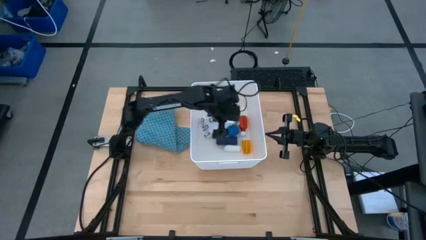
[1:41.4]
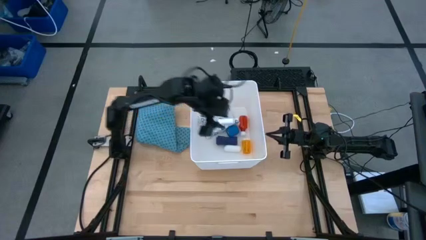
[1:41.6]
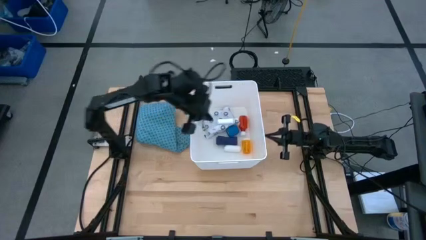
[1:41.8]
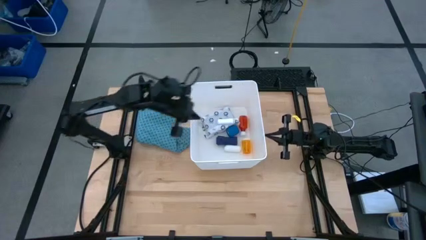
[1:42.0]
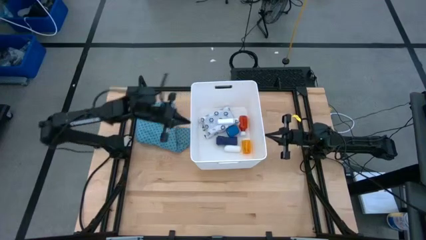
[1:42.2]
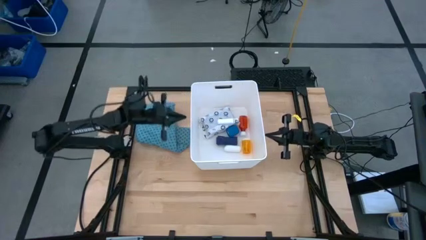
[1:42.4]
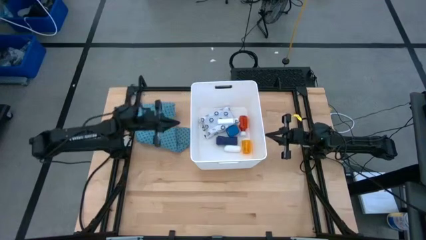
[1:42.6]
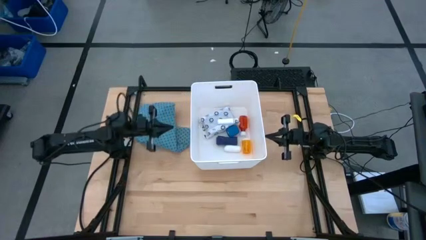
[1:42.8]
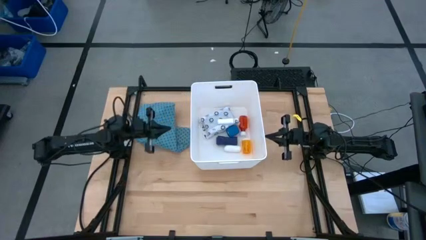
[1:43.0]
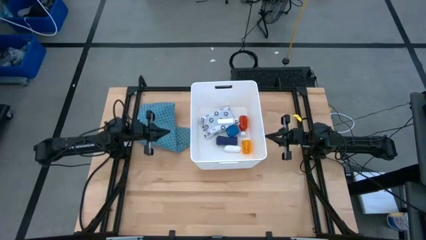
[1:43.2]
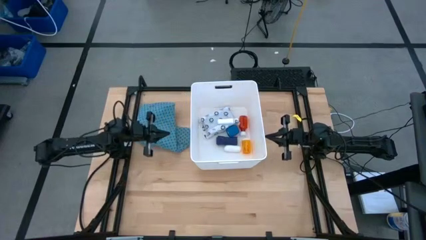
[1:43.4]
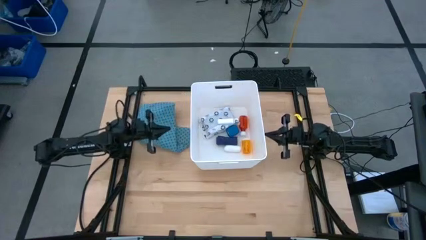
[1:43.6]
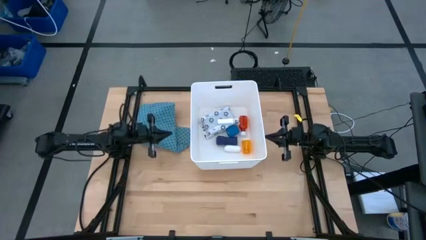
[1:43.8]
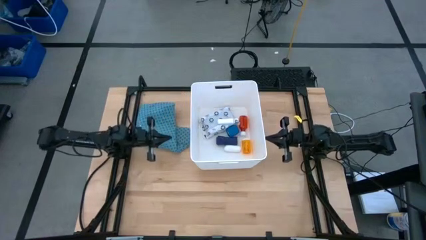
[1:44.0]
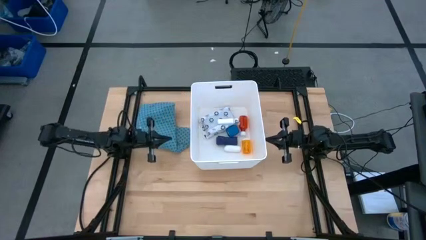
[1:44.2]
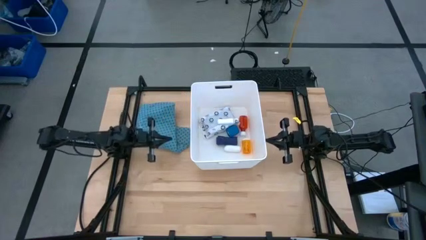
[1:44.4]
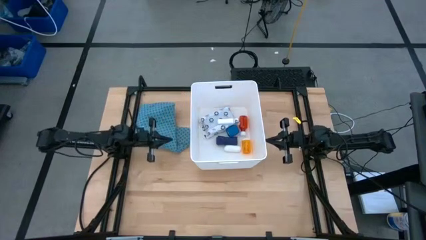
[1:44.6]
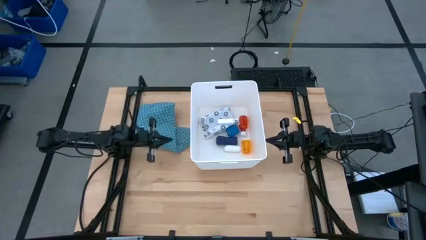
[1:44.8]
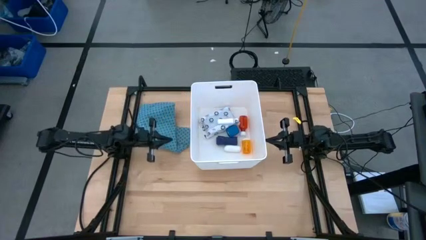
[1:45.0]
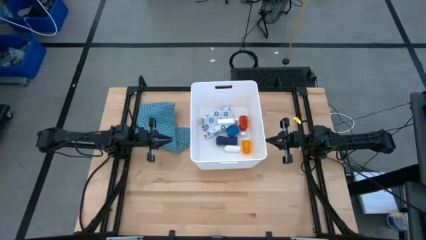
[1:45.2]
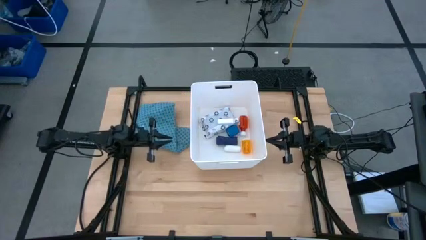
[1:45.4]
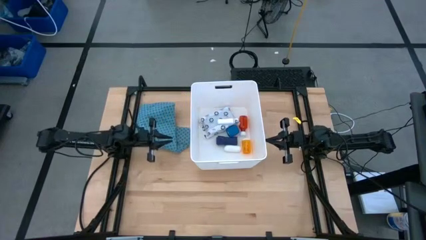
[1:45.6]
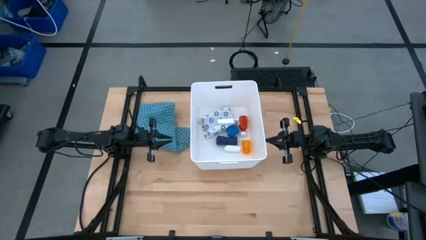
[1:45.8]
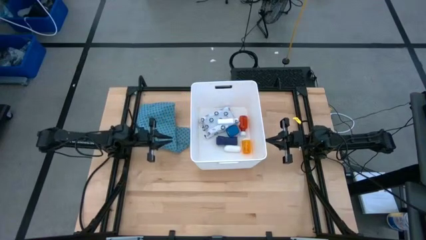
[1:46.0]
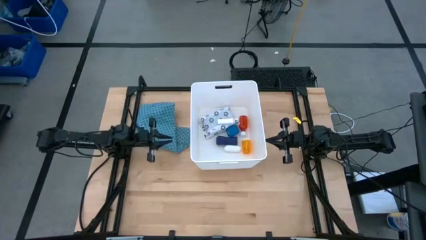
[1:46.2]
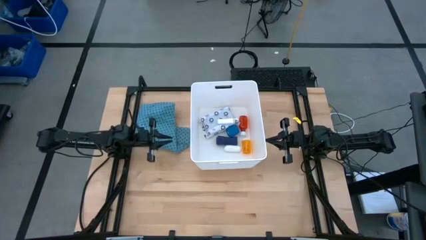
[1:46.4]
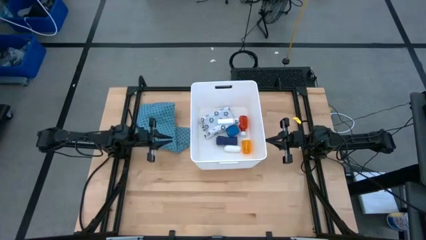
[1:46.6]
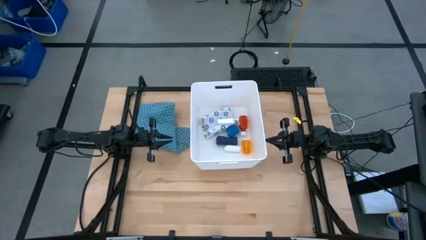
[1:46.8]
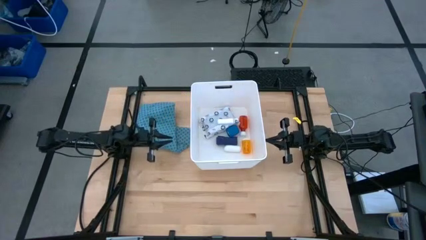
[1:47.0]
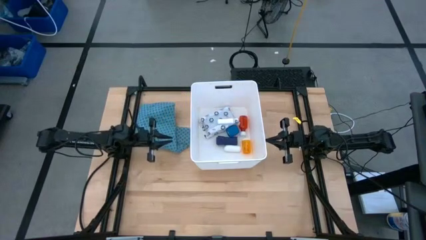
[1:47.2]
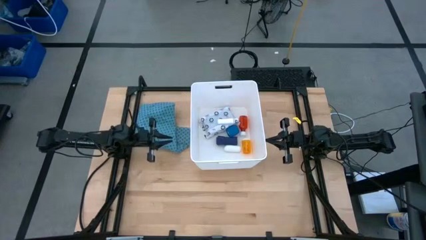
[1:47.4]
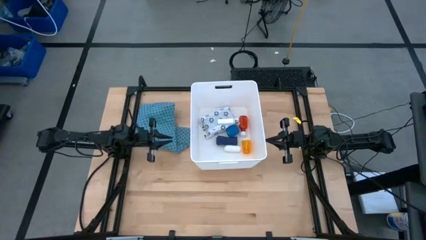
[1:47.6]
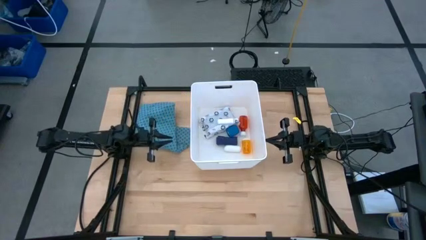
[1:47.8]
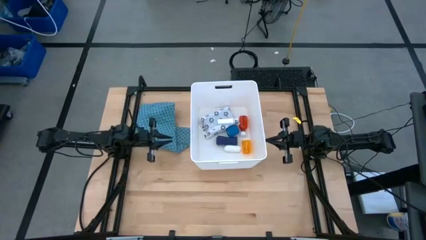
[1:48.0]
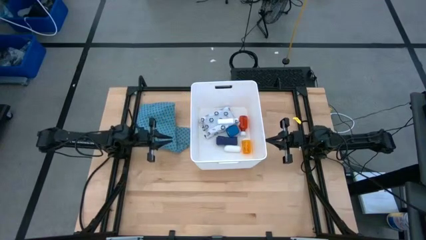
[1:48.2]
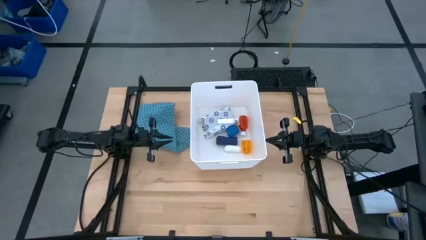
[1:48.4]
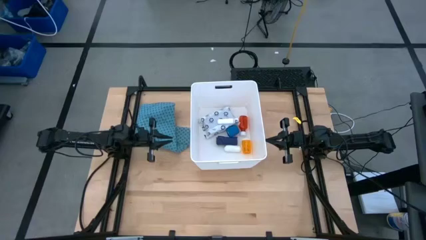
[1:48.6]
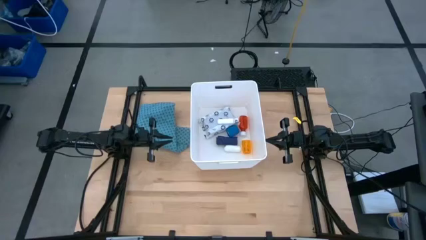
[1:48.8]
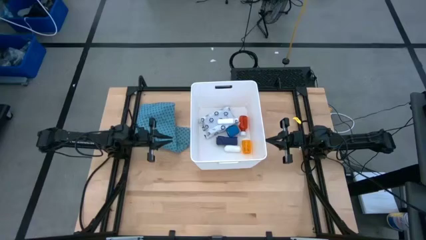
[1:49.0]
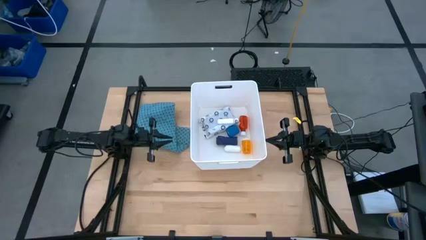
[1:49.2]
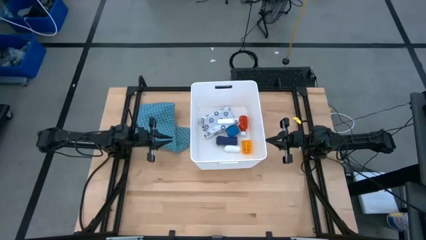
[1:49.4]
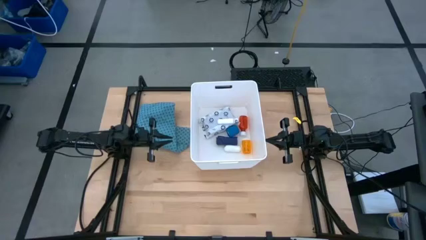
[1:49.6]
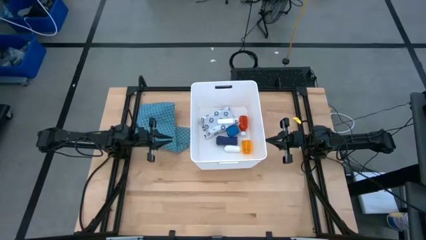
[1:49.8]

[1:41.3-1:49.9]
Task: Pick & place medical supplies in basket/bin
Return to Home Position

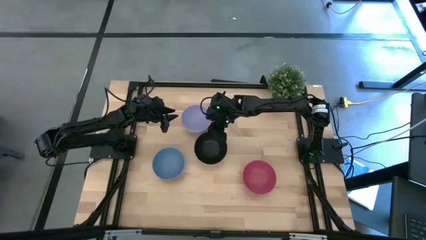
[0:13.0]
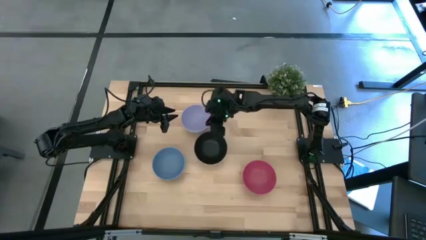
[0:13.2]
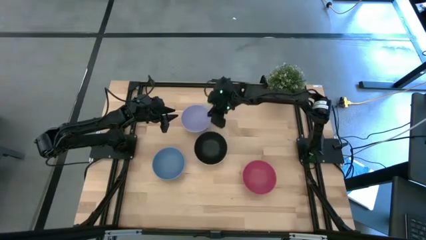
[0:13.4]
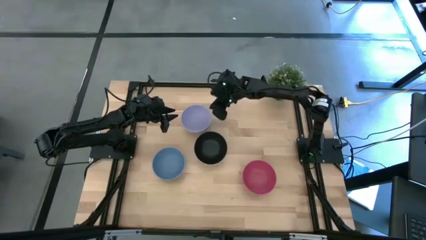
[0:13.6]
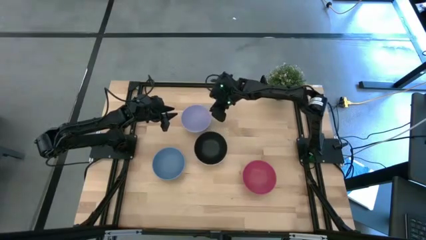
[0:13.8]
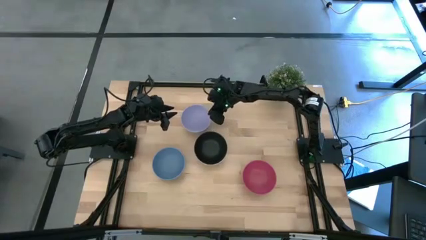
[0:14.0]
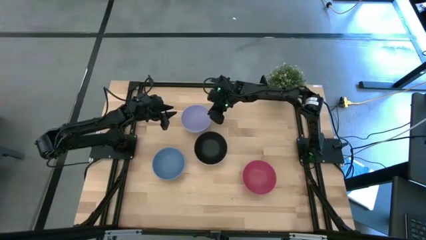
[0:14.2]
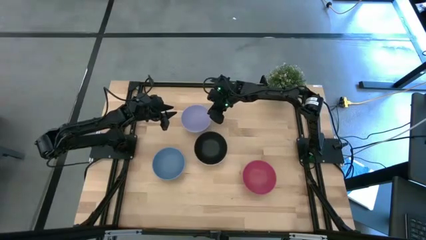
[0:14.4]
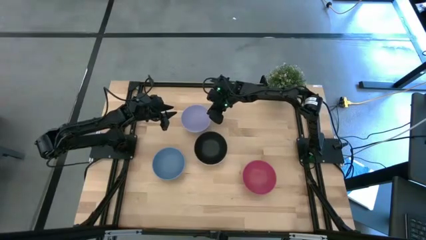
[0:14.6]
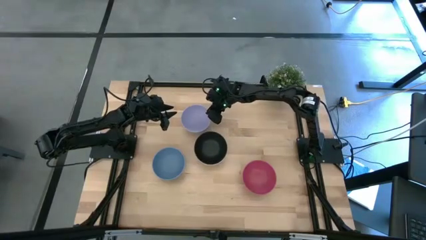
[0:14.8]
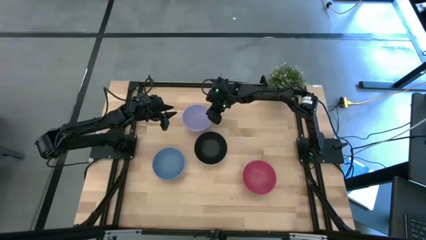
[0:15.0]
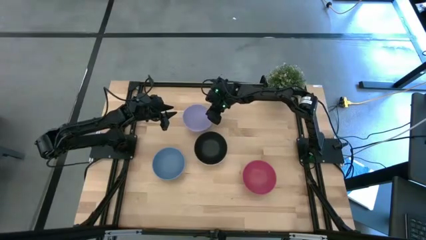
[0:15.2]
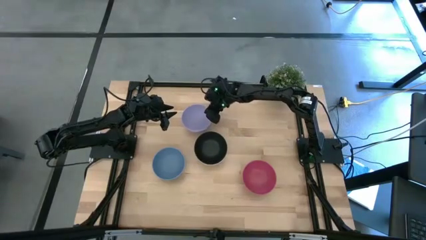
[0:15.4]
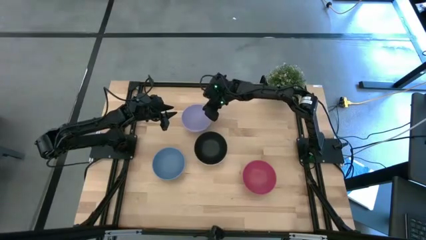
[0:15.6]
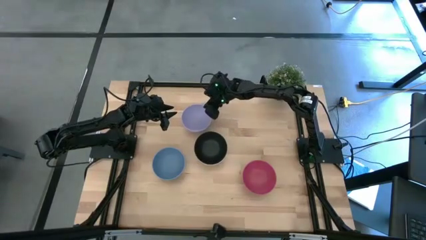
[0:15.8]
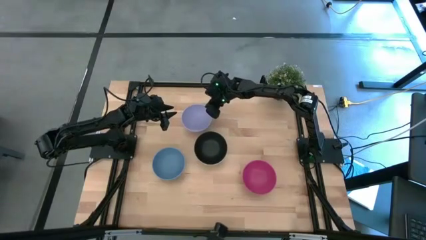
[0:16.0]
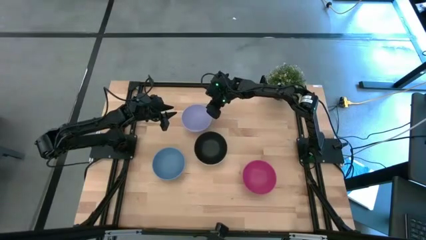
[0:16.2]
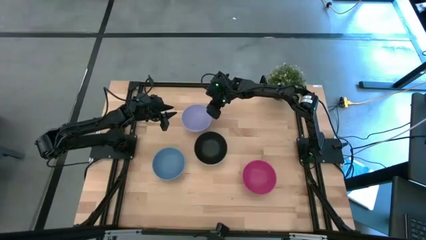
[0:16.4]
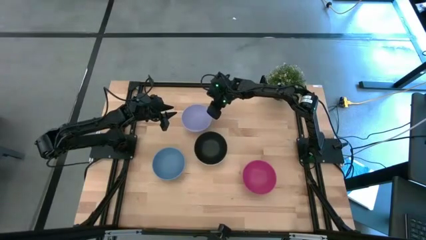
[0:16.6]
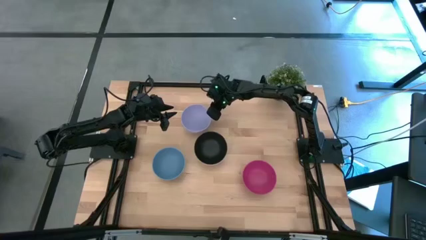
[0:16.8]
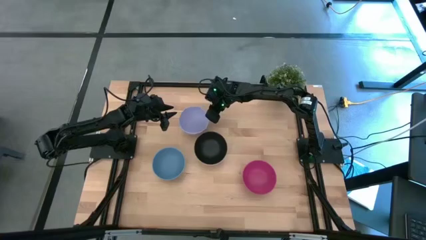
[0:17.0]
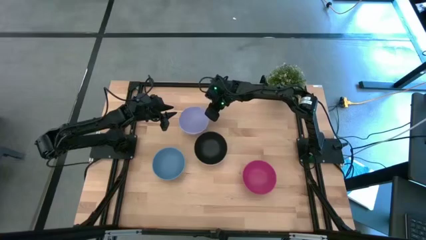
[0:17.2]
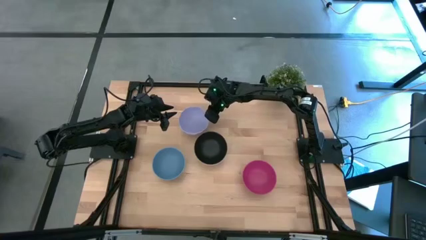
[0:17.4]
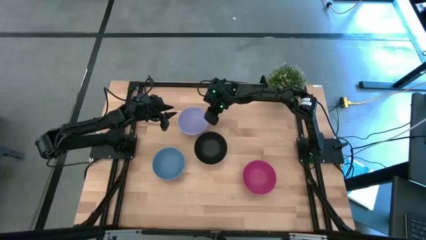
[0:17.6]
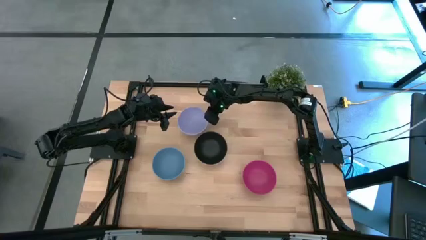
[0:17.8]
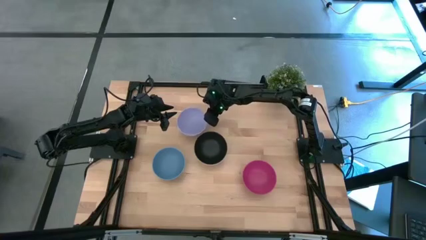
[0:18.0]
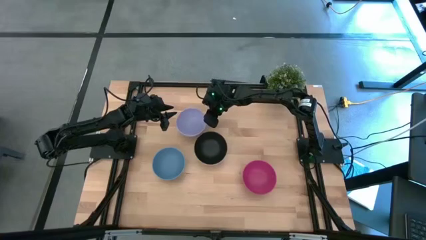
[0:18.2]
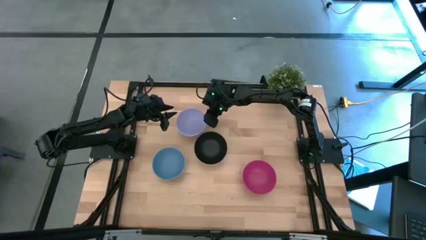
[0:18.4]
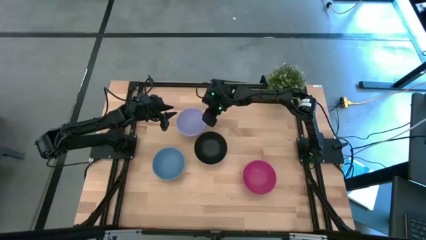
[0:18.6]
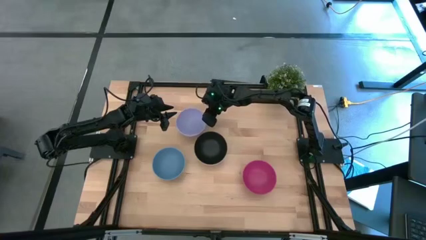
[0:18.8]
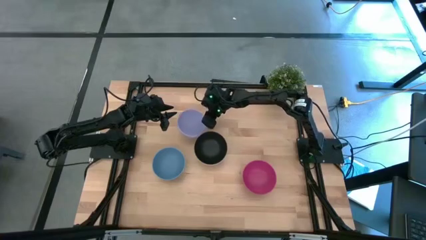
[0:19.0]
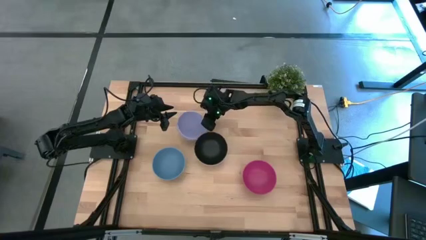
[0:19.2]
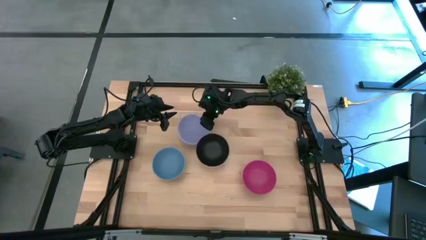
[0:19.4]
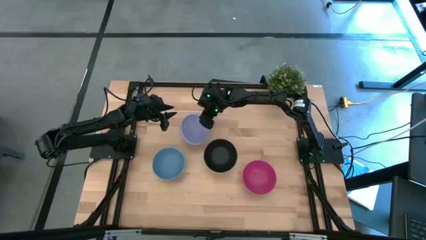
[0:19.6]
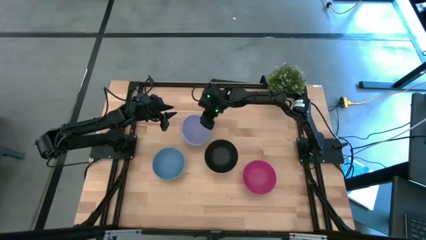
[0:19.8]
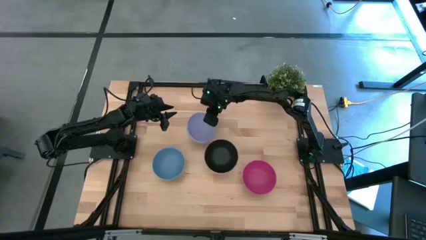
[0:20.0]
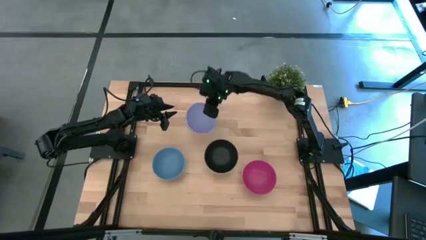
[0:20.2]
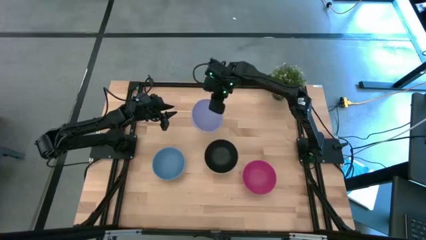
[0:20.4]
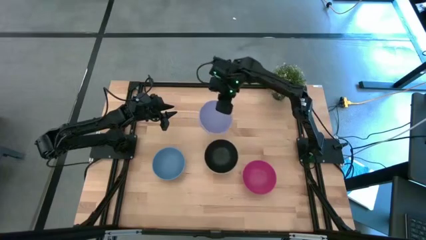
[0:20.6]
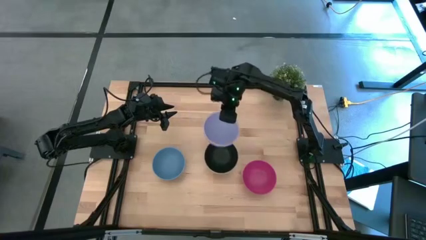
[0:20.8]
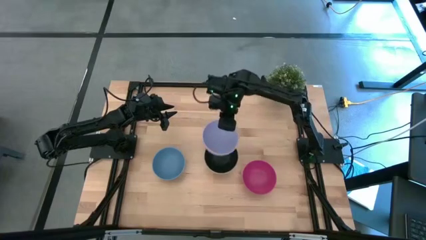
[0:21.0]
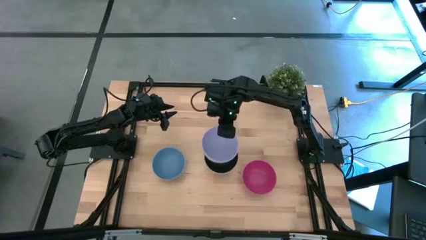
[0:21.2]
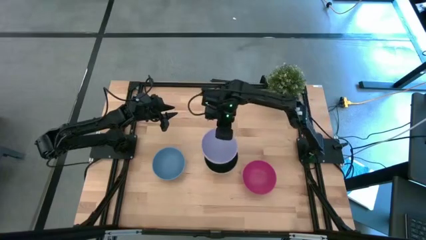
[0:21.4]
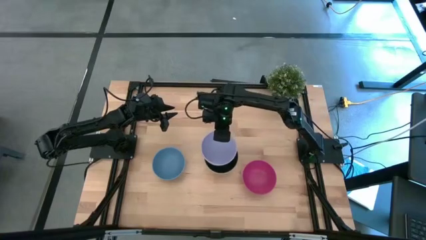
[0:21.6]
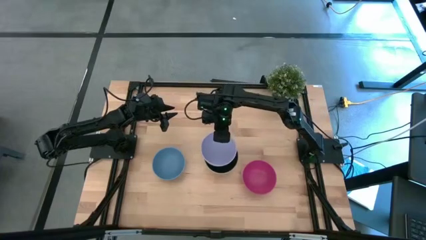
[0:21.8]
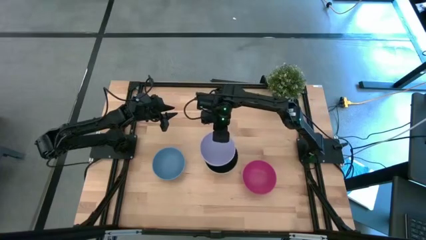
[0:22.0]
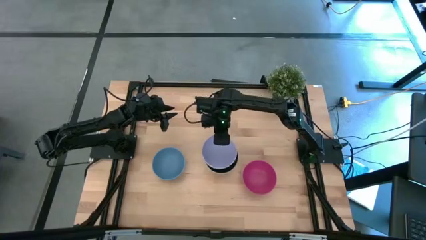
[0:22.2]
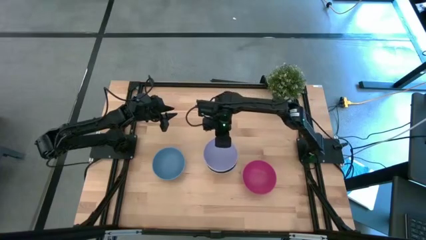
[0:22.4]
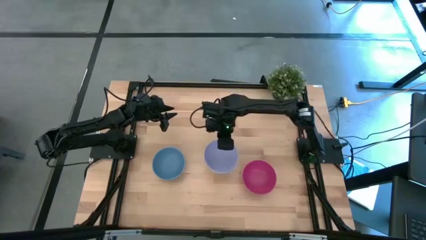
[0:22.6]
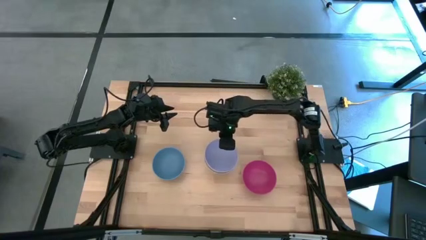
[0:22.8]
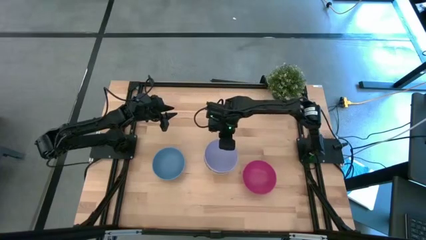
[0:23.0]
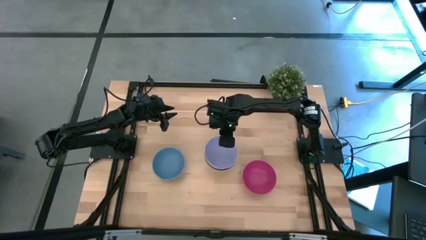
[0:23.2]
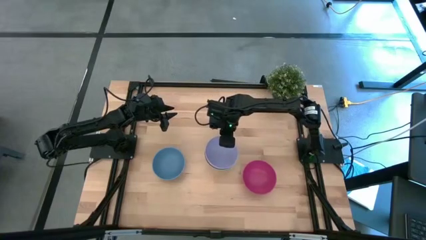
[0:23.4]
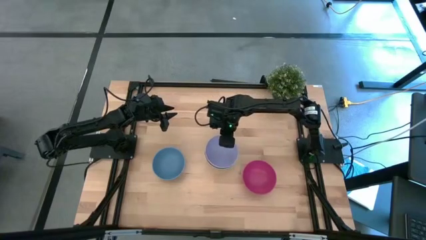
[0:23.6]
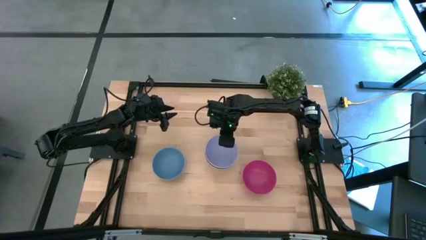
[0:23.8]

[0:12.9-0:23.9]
Task: Nest bowls inside each other
Stack the purple bowl on top of the black bowl
